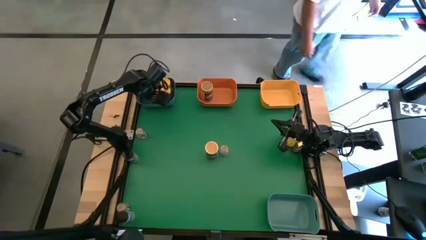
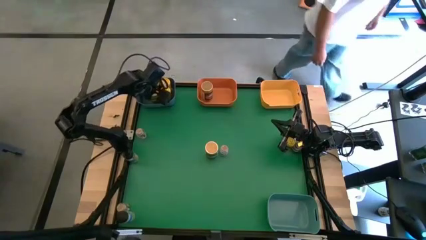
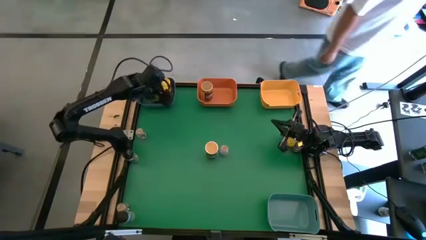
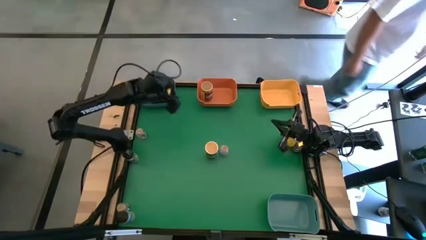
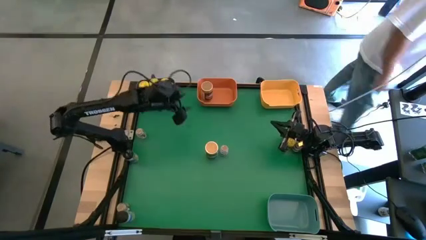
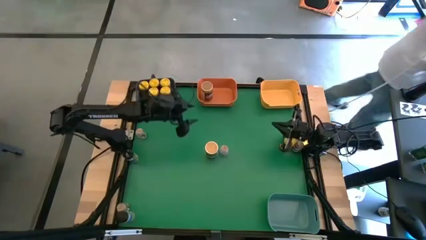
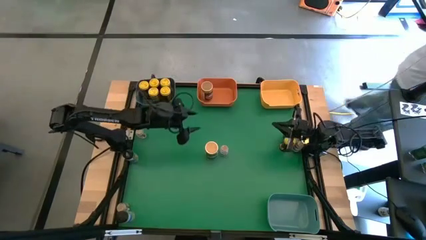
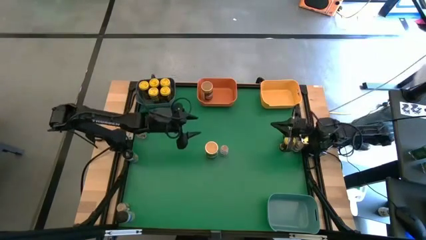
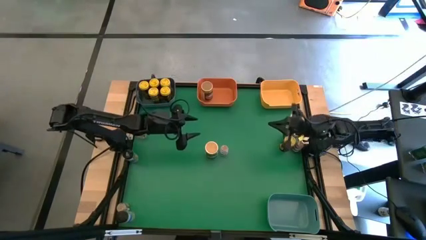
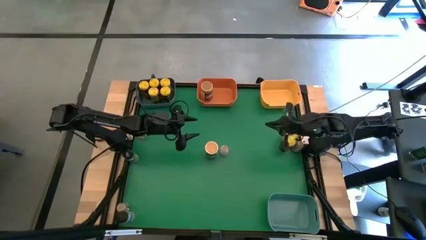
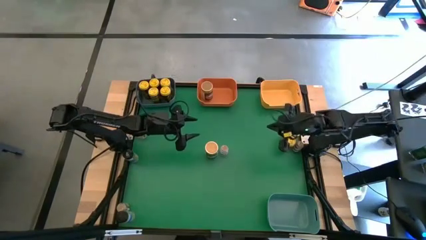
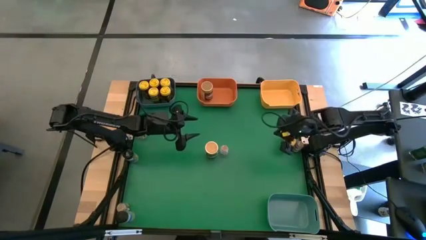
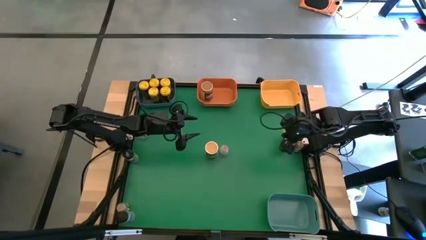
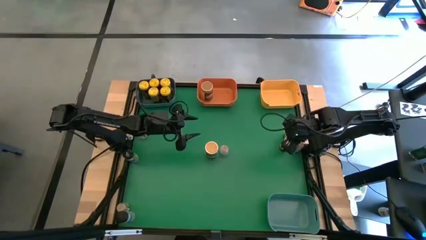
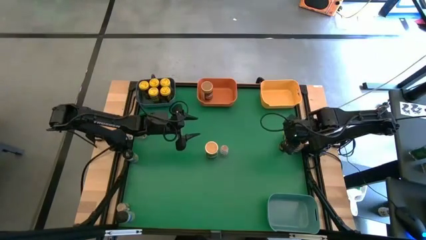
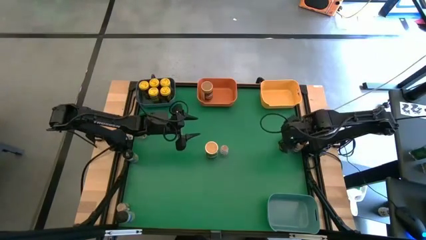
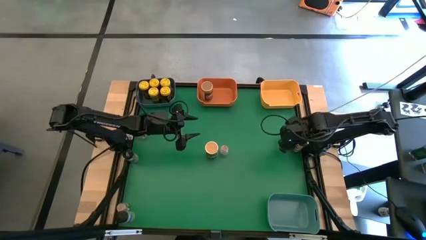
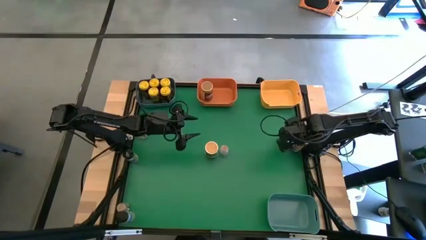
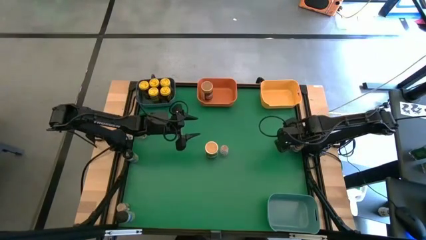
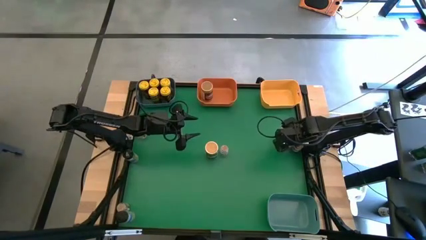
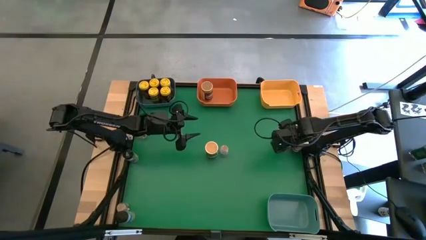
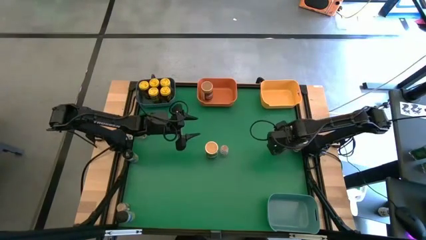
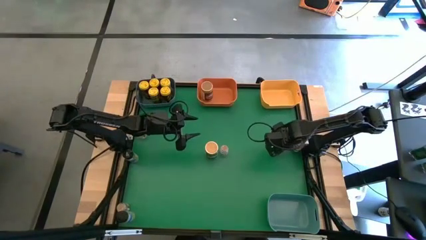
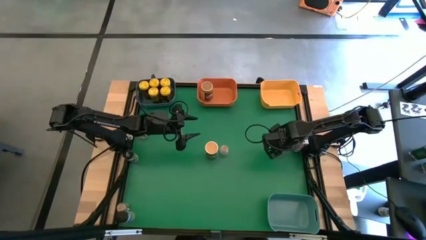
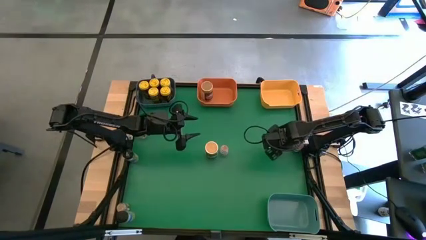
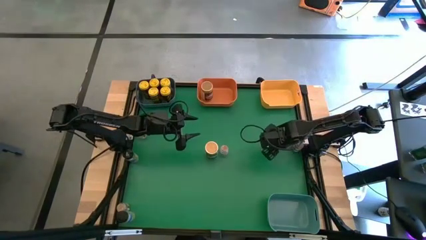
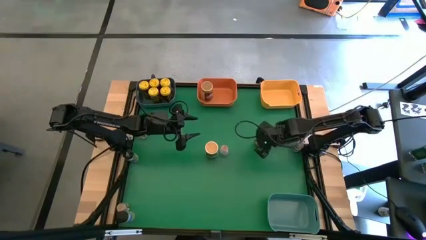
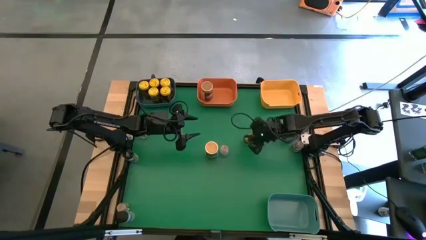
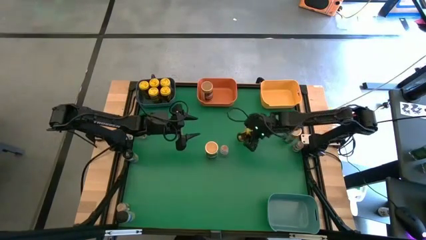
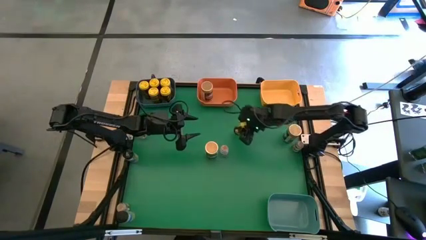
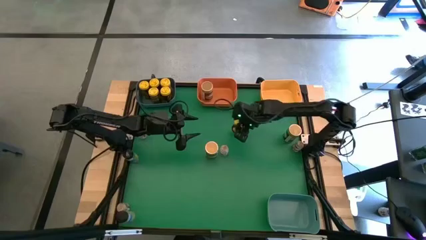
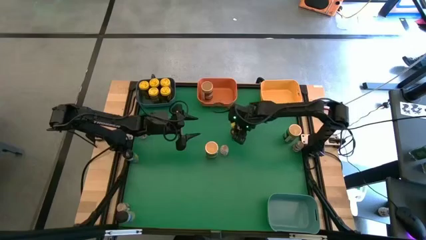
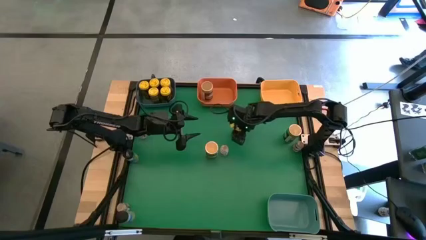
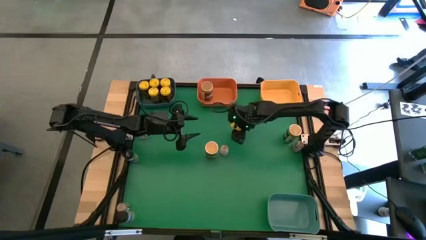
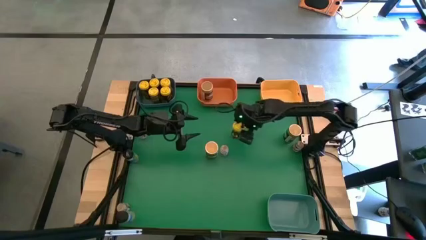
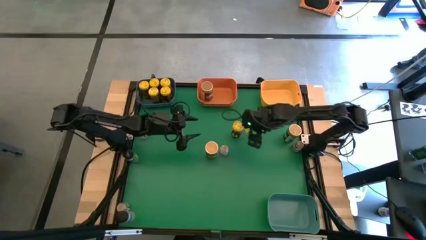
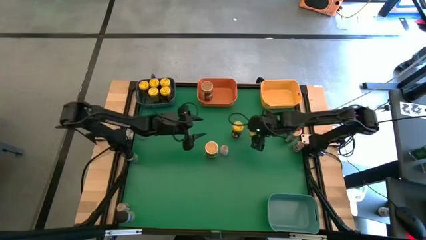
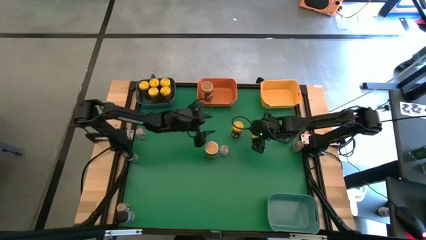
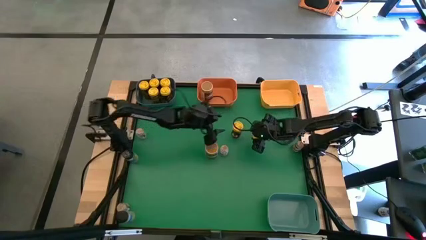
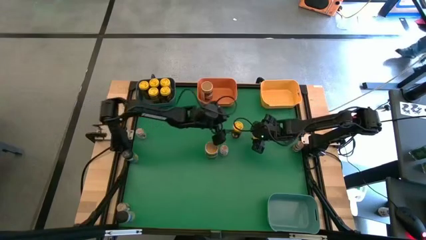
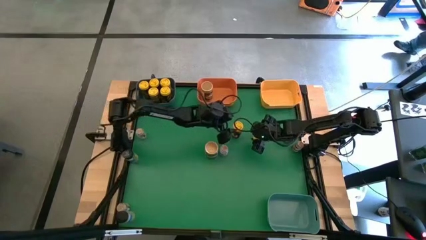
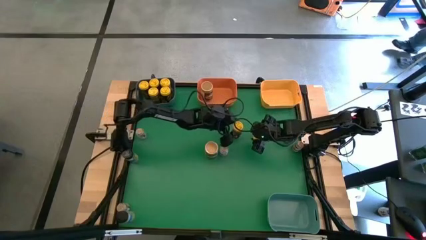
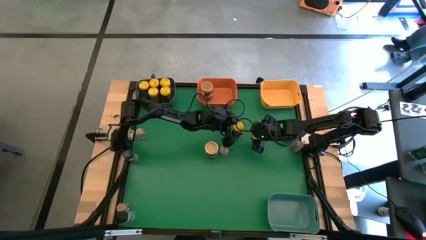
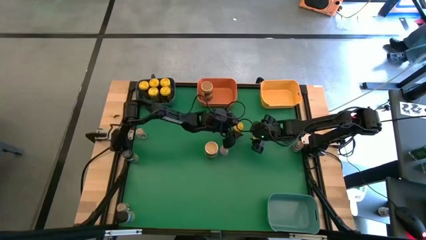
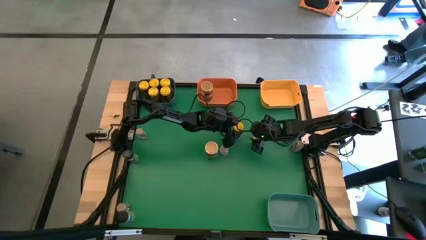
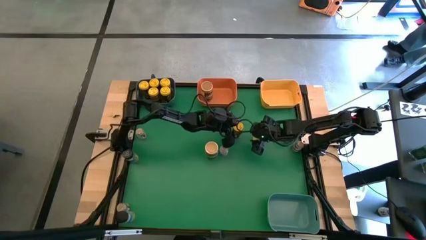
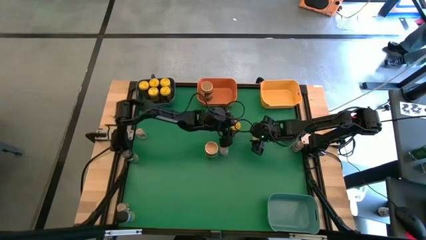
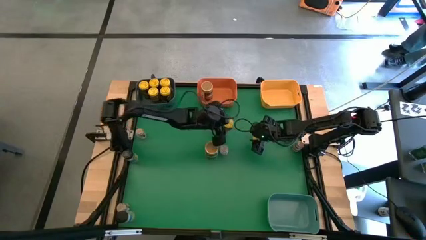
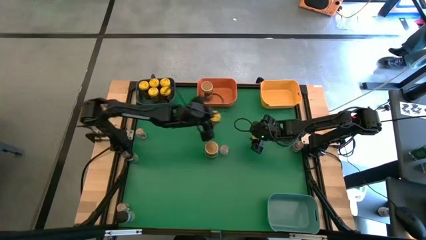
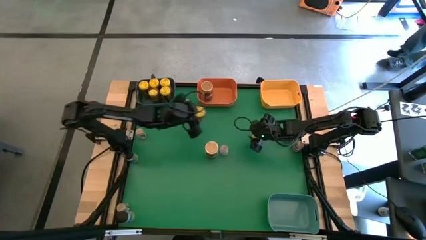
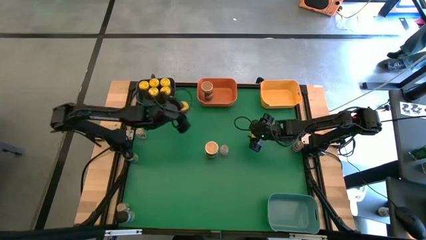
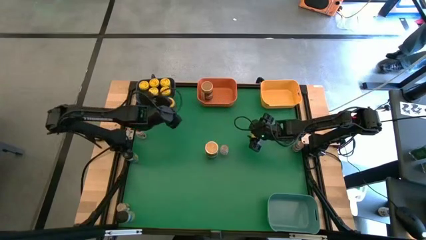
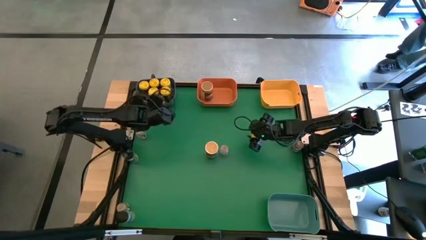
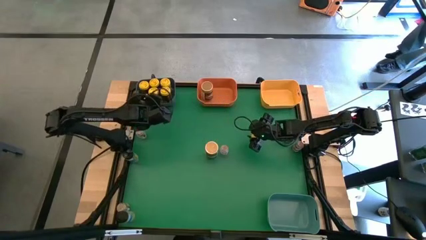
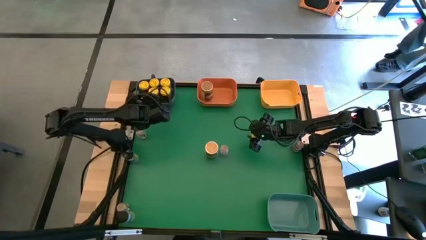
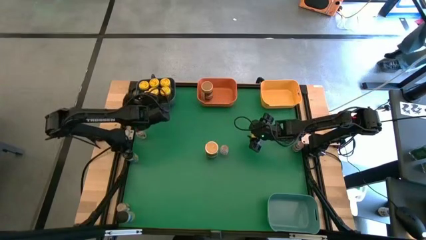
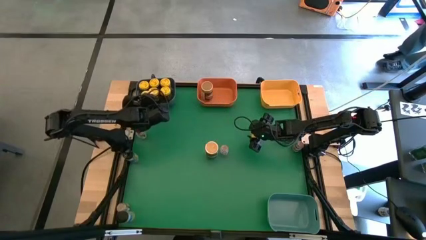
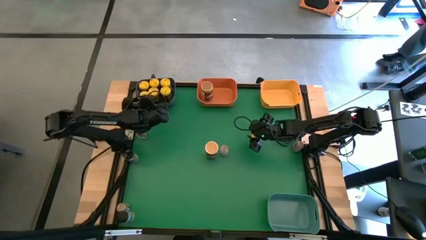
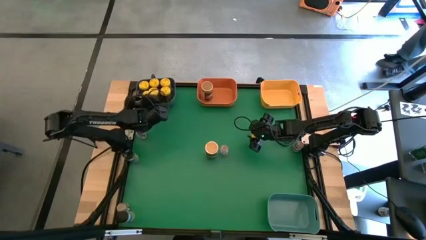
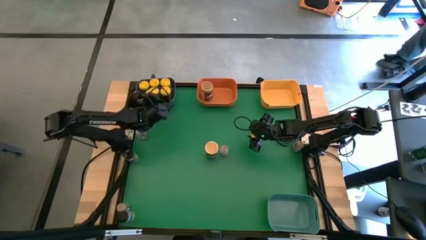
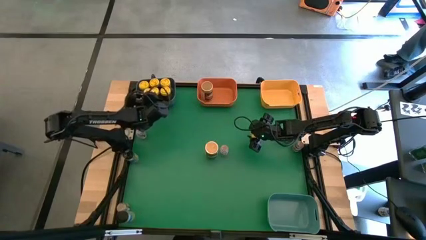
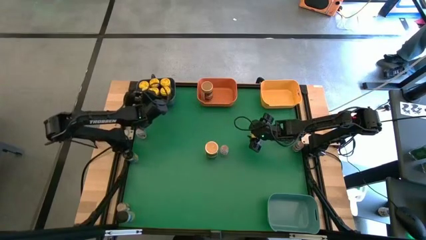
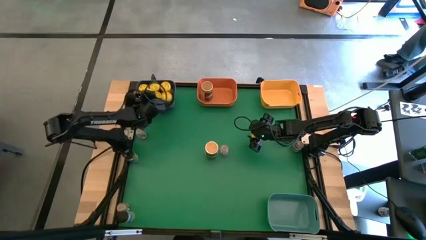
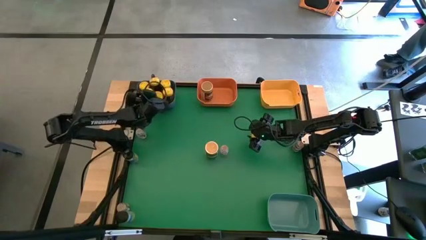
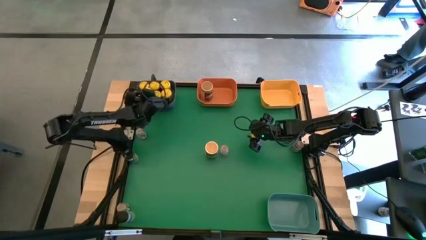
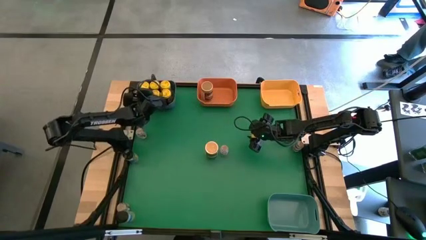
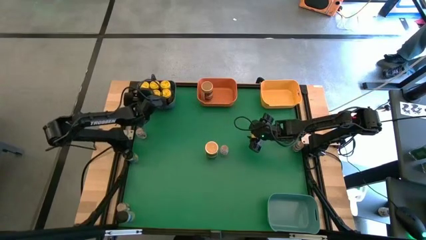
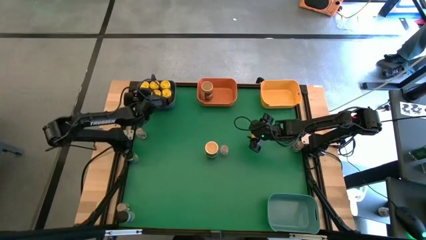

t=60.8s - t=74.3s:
Task: Sort spices by type
Put the yellow seasoning bottle into the blue bin

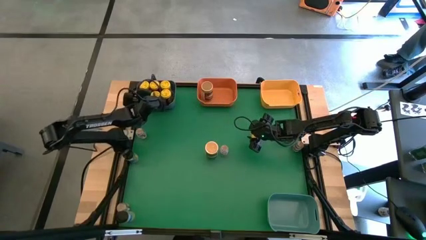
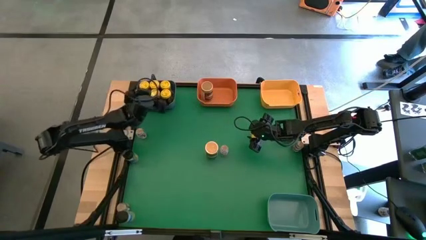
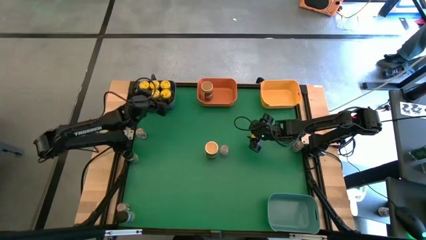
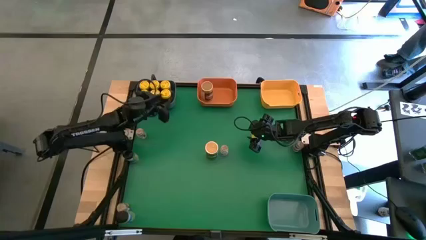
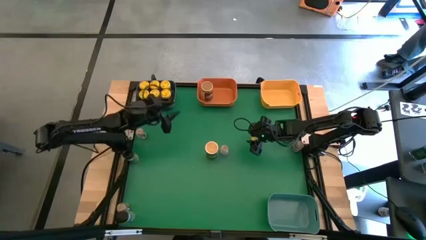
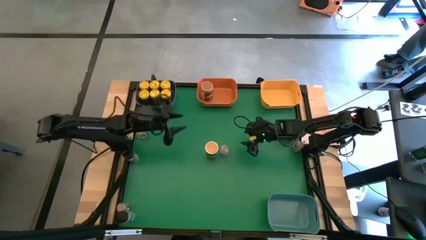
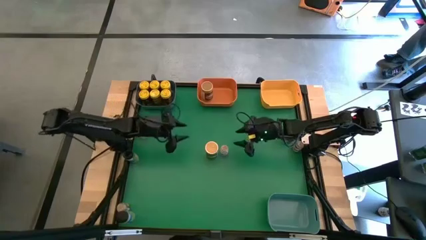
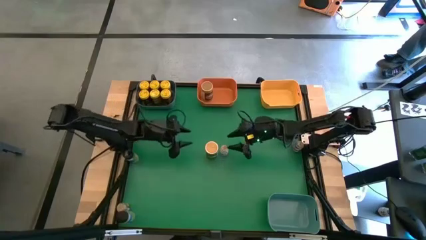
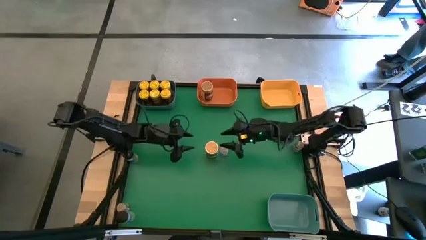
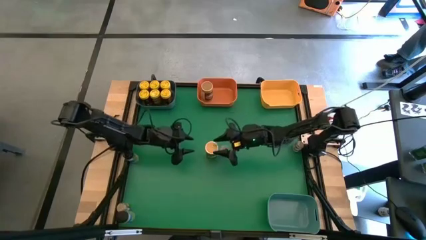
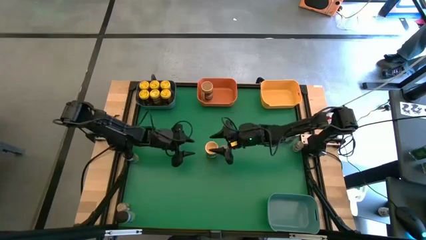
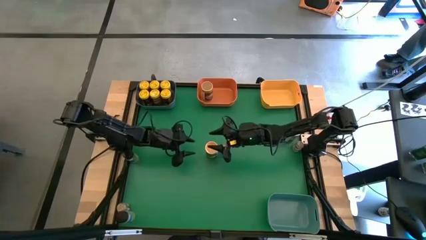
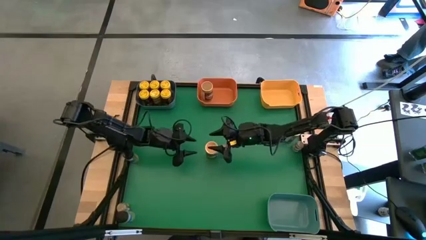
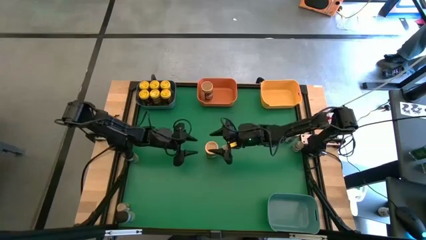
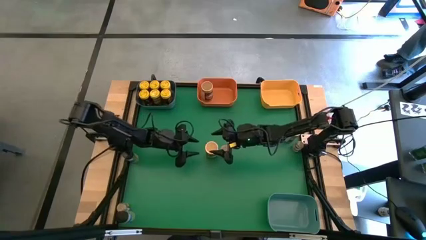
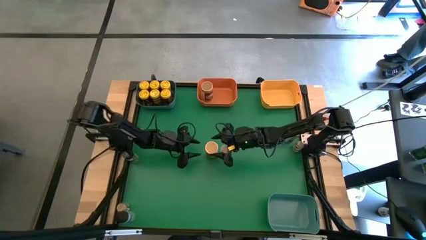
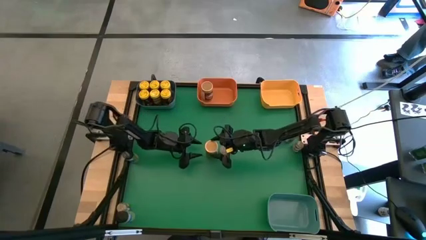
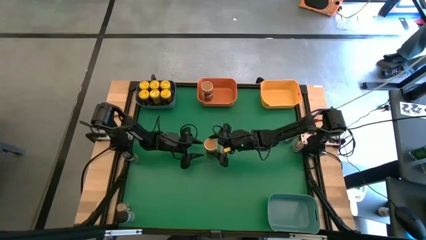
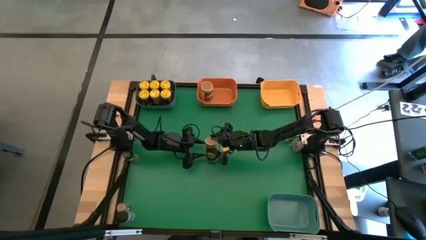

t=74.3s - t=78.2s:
Put the gold seasoning bottle into the orange bin
